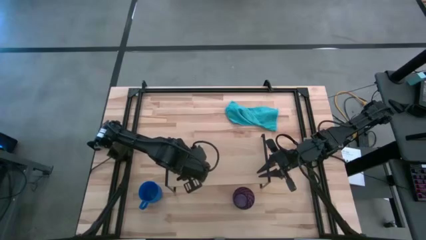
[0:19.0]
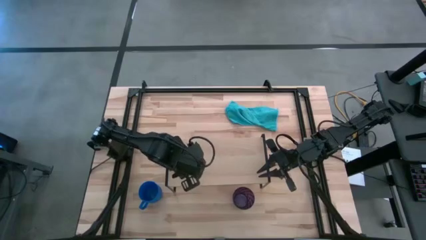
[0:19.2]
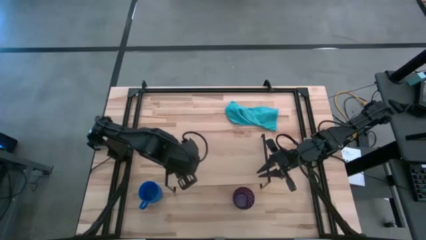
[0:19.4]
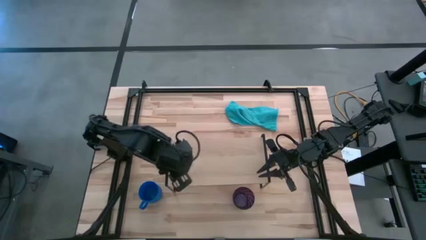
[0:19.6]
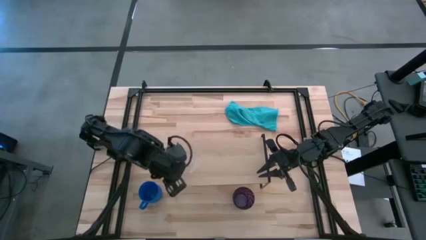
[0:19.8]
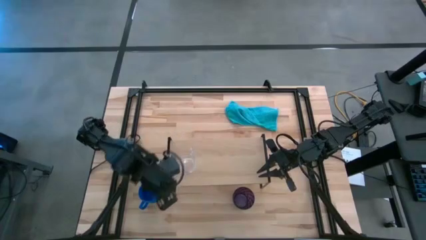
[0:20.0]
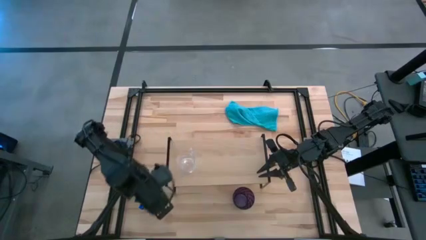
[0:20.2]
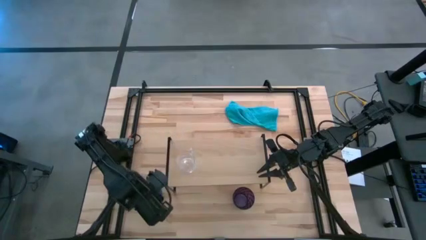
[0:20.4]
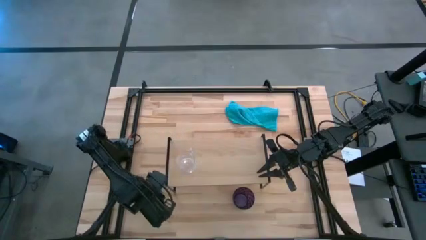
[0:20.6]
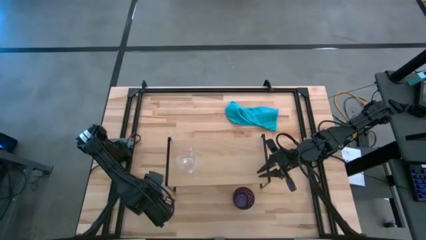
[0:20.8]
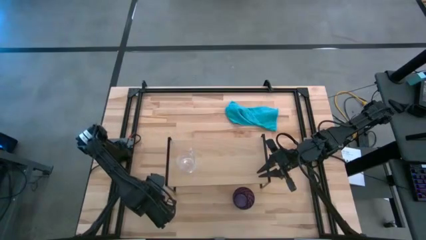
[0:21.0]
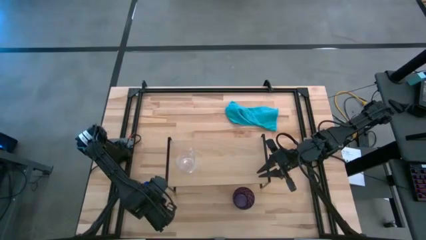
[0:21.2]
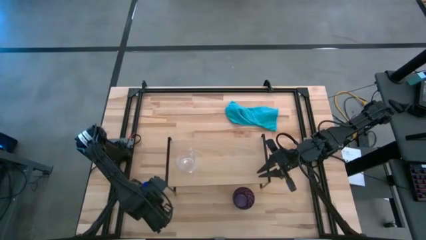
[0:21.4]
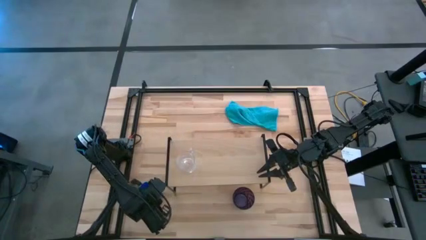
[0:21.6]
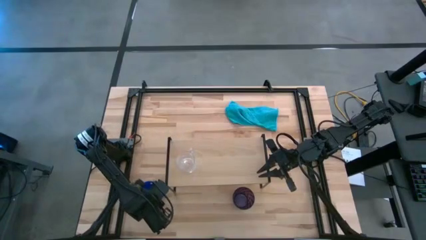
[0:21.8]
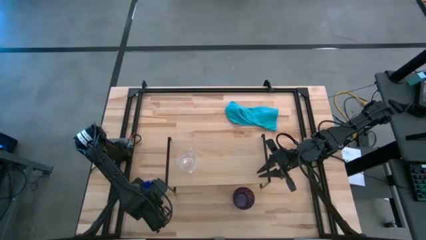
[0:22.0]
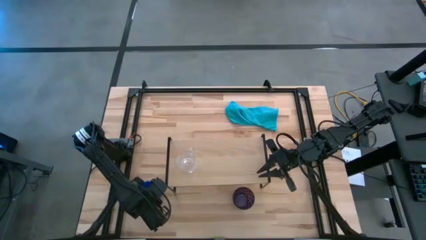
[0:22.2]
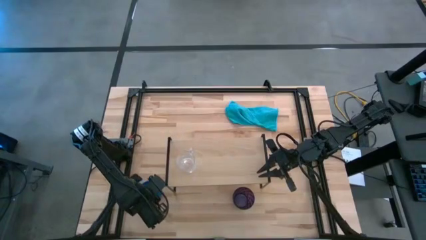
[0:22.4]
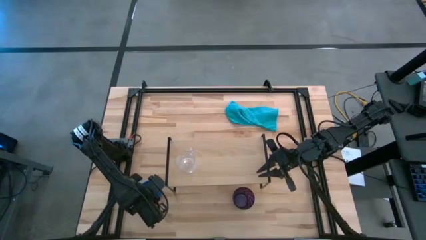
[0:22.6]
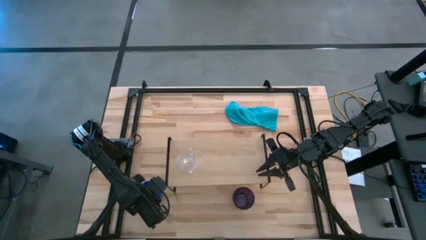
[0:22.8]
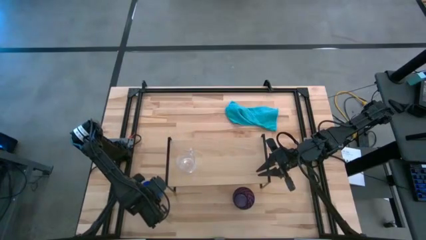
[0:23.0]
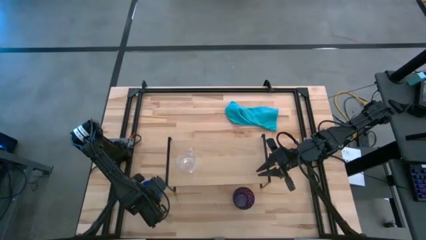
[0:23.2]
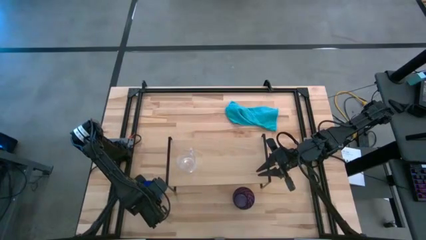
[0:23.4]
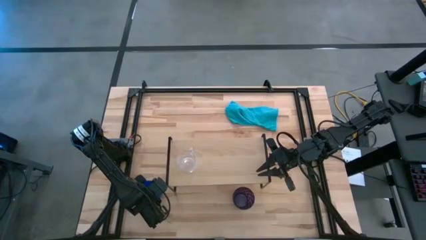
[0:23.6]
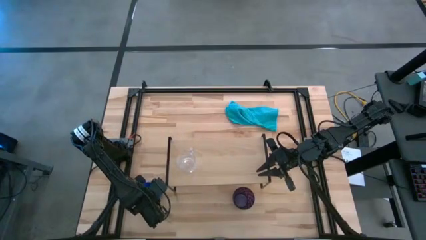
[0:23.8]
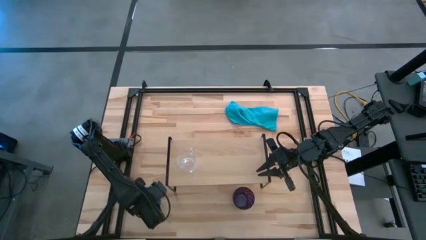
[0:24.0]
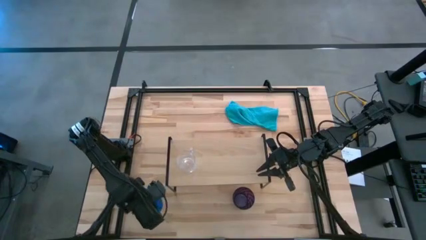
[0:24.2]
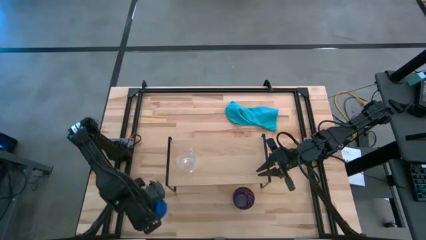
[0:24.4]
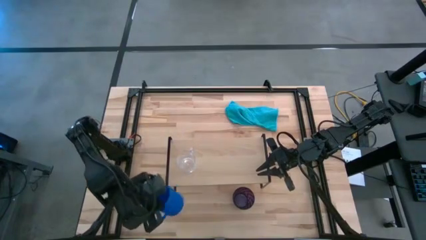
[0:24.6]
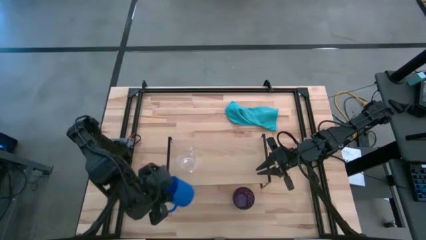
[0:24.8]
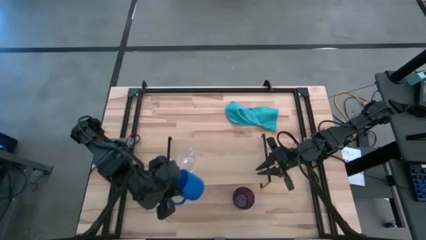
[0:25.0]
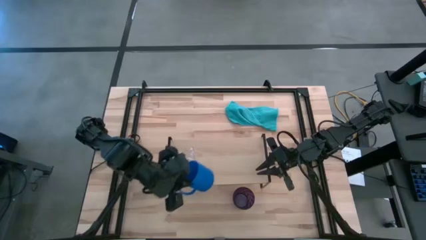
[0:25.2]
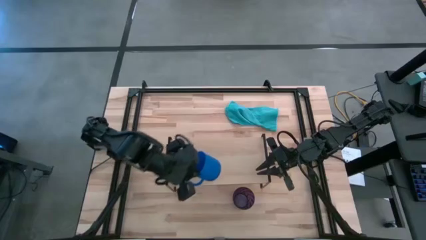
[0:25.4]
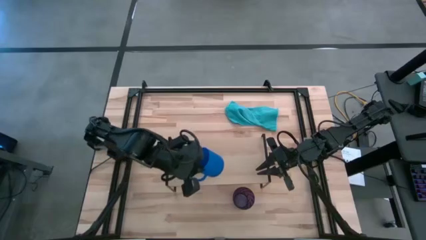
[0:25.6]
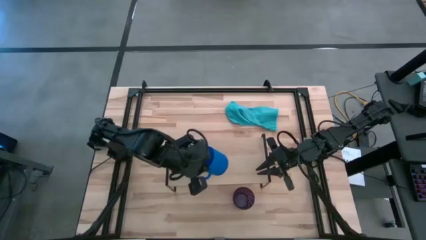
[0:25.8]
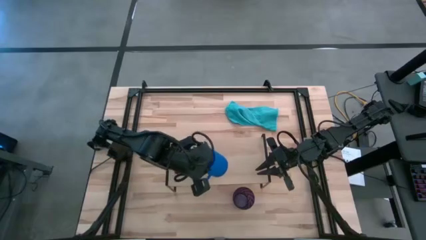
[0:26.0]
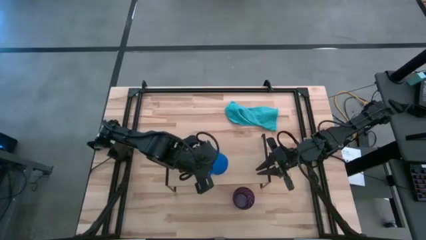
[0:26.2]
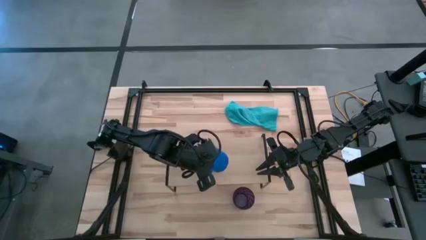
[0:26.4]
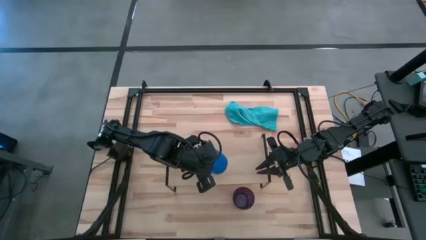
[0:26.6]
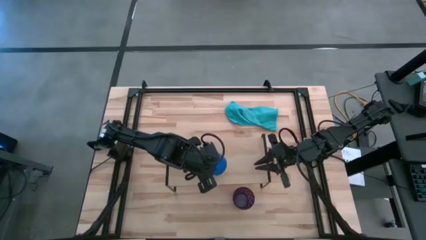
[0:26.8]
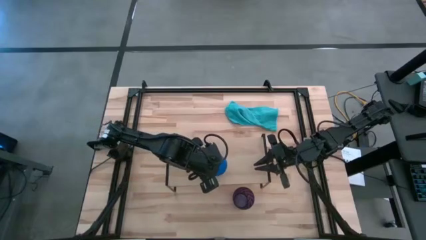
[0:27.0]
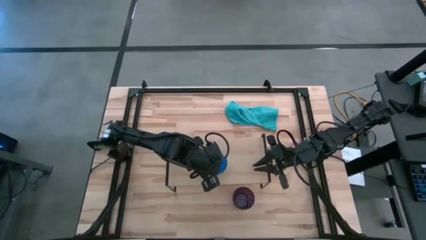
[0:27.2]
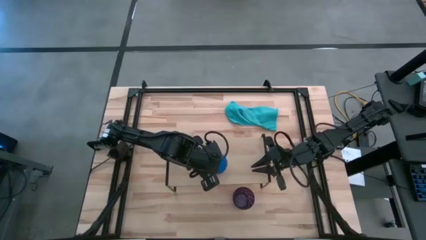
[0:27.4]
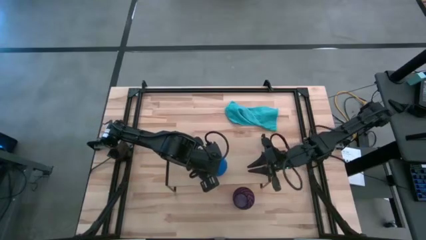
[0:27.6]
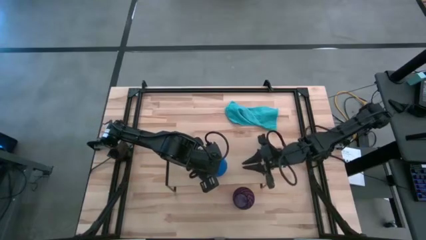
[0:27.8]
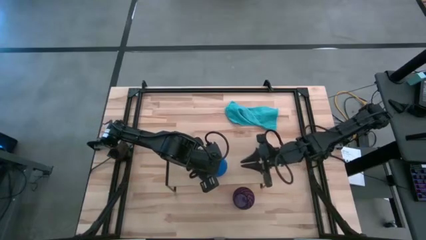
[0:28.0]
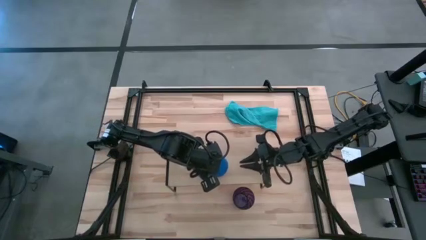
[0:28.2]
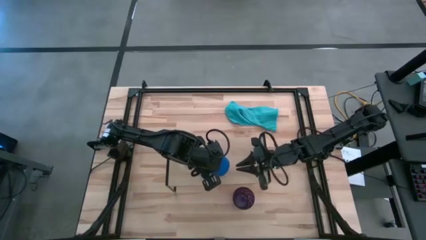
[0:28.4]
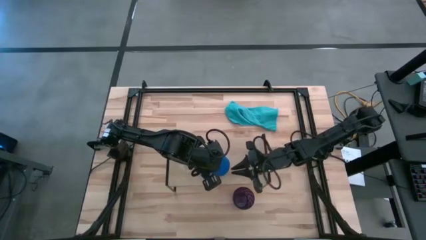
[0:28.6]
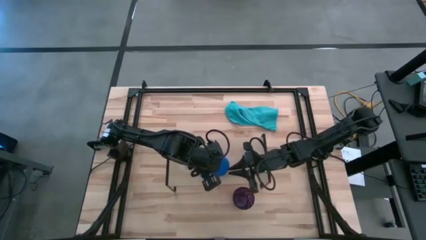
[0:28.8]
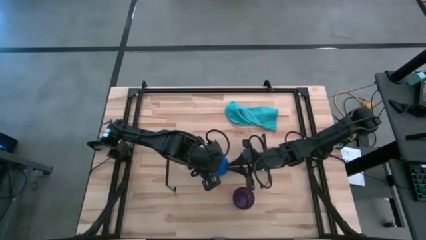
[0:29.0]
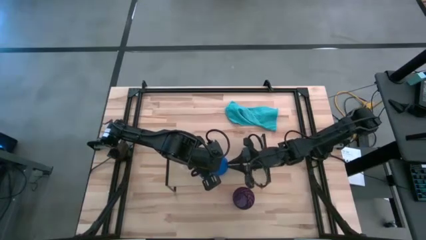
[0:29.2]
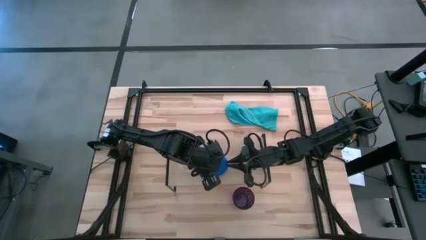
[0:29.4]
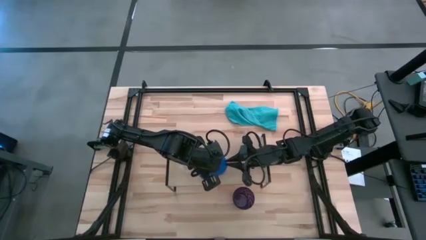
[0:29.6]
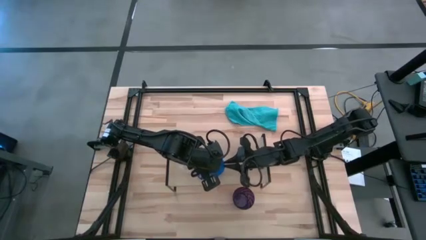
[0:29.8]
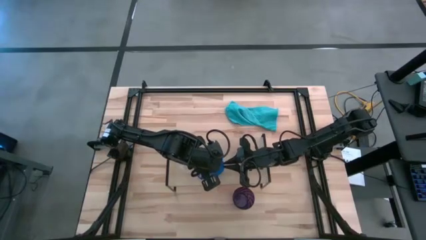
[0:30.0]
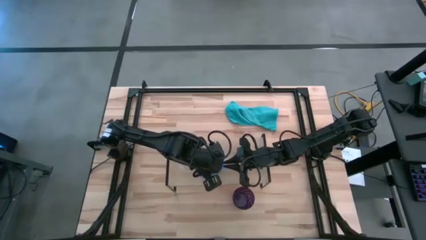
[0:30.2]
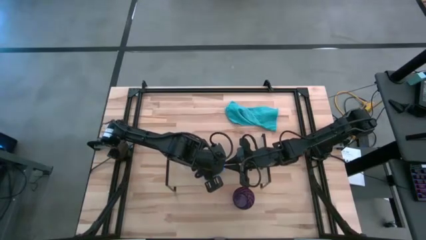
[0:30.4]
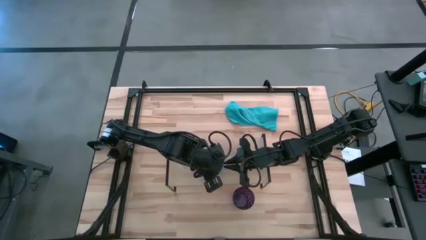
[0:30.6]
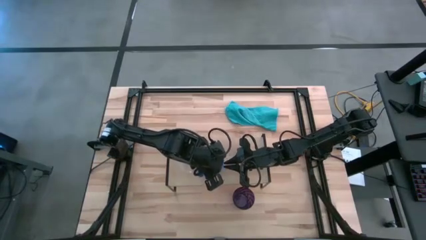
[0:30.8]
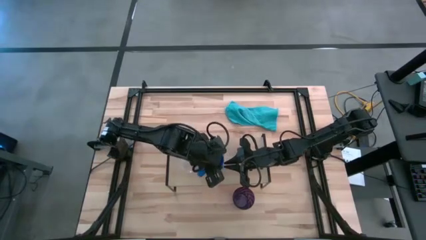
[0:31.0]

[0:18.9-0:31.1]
Task: Stack small to large cups/mugs on shelf
Put the blue mug on the shelf

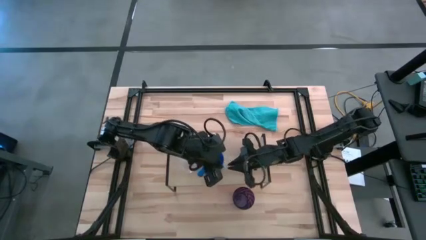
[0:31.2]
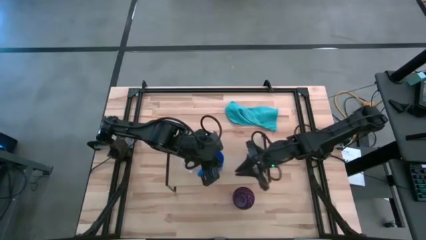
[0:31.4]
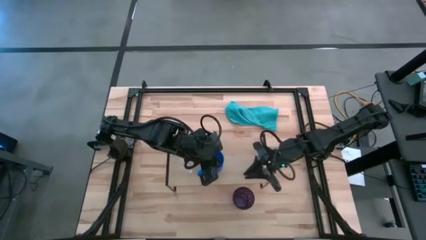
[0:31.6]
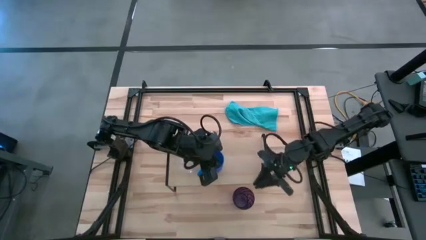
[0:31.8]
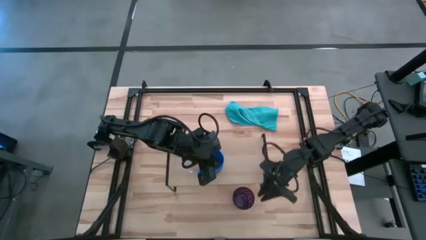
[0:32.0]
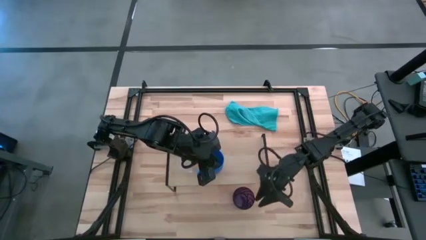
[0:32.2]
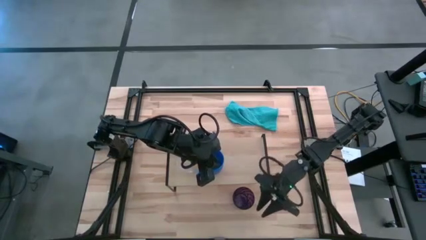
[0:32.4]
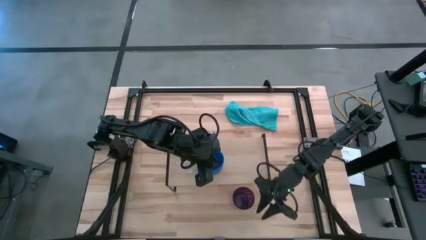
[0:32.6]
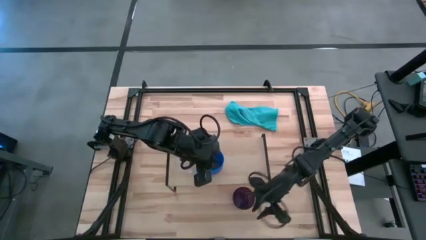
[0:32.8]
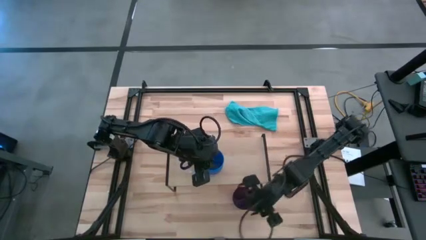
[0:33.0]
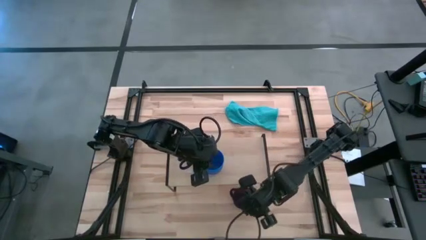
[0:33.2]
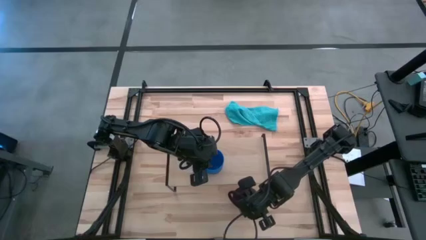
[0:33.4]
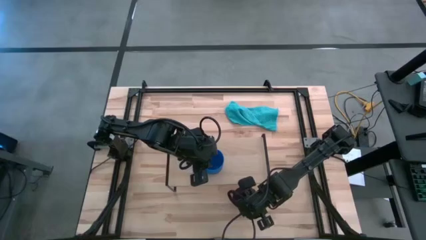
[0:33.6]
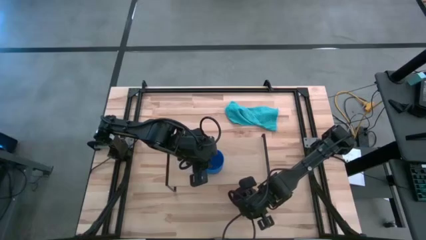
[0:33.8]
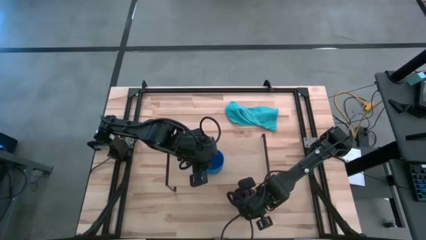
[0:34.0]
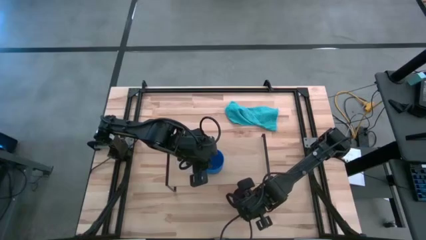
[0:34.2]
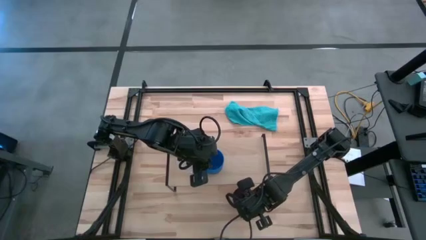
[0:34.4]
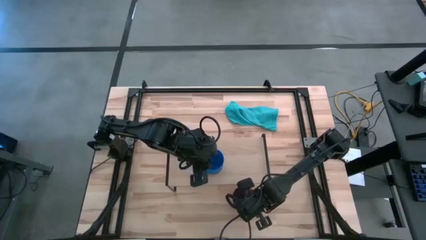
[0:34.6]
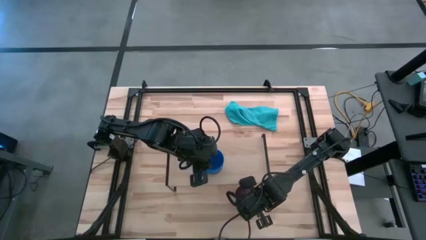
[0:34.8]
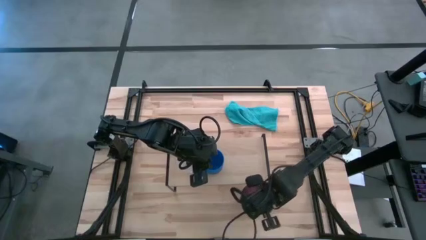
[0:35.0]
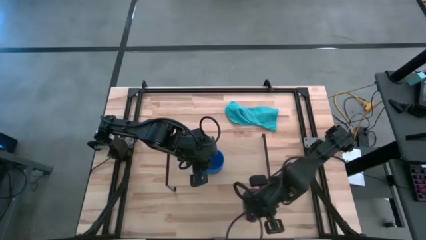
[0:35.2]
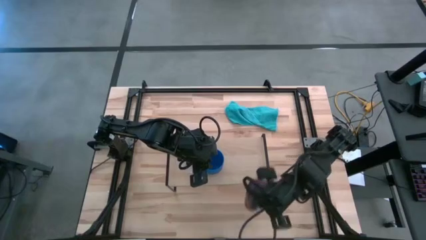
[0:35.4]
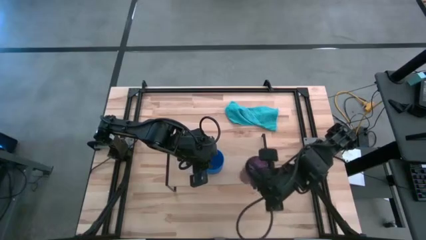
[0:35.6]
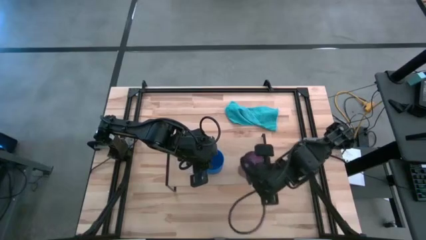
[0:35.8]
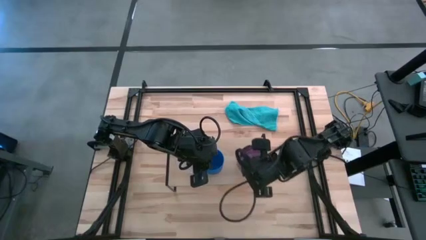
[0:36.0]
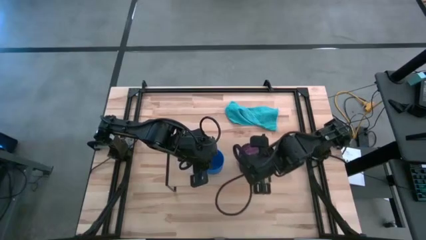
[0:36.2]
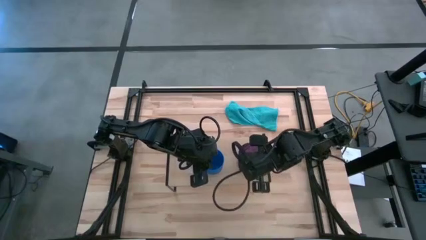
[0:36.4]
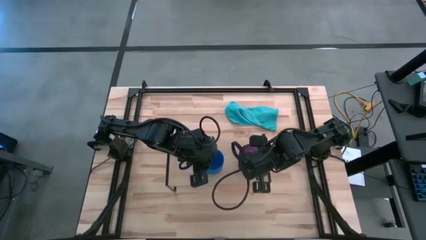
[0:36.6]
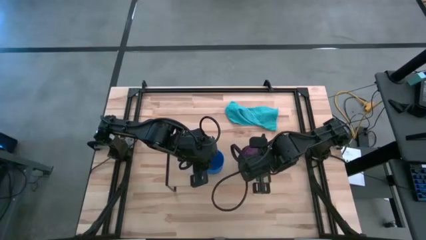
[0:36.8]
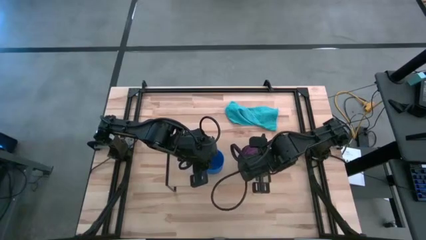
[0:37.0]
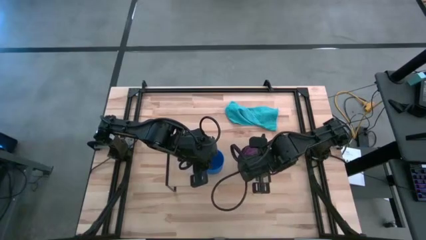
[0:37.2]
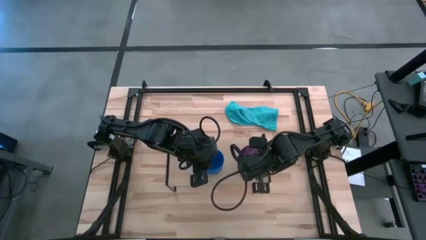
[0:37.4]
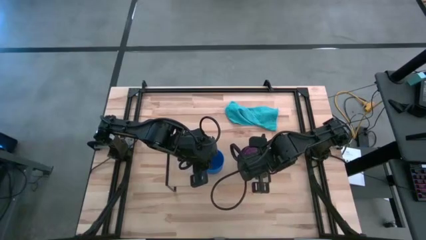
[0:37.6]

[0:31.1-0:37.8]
Put the violet cup on the shelf
